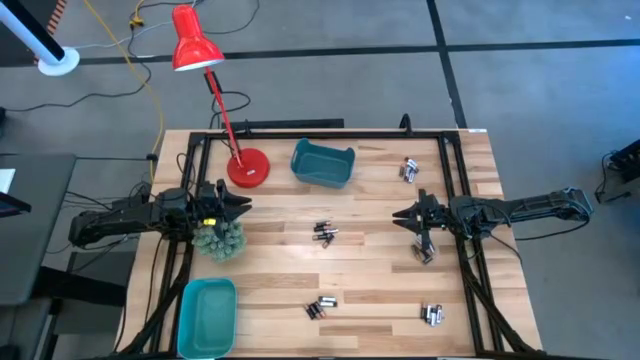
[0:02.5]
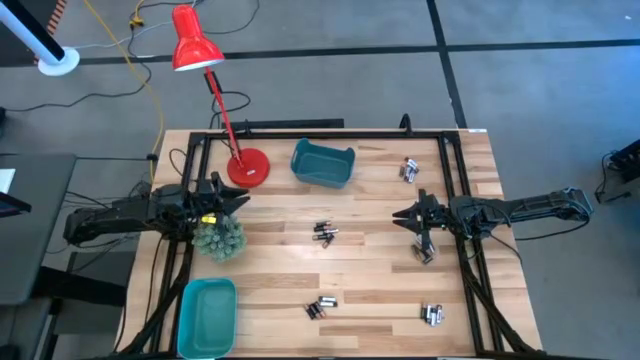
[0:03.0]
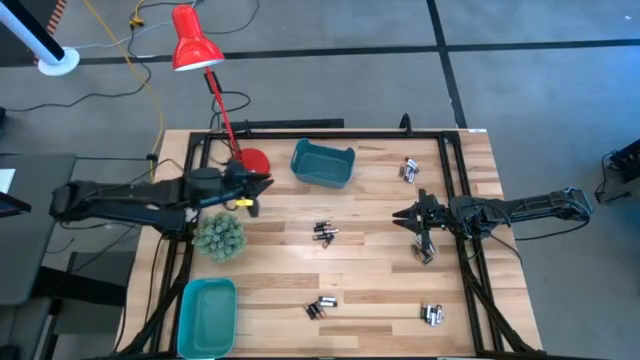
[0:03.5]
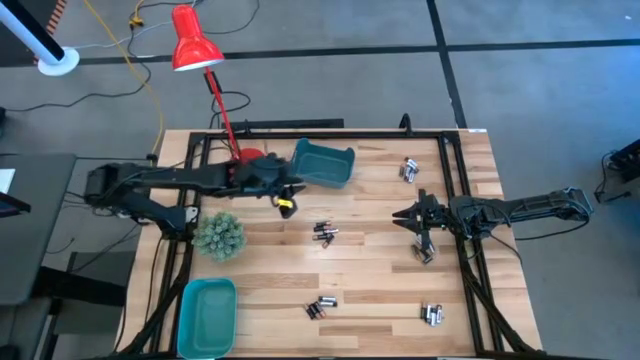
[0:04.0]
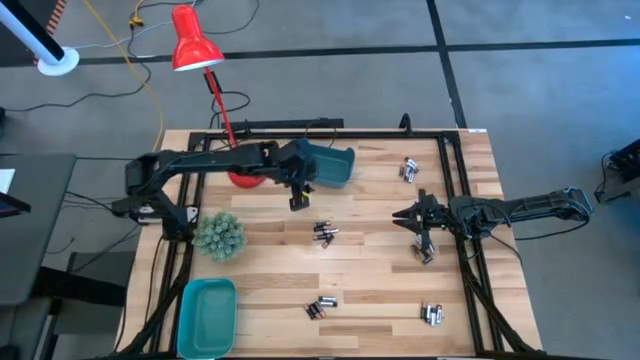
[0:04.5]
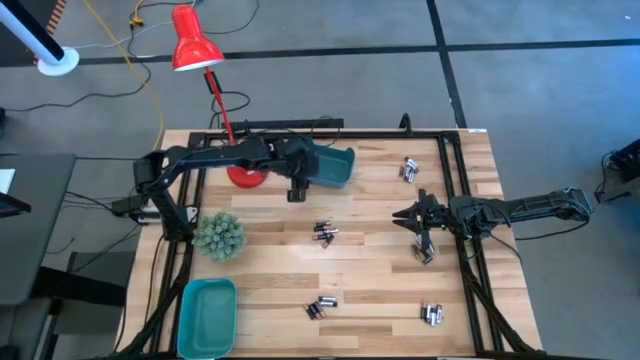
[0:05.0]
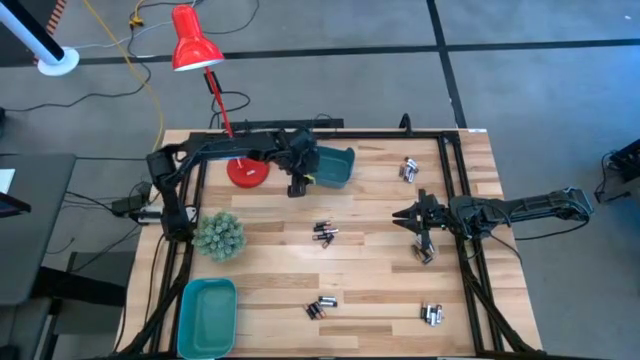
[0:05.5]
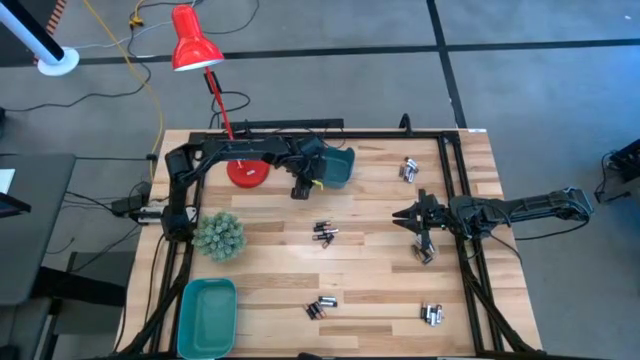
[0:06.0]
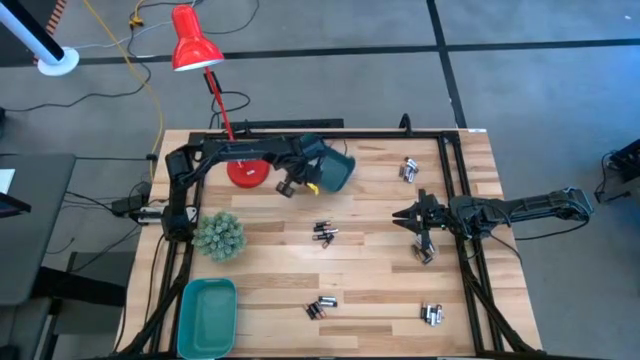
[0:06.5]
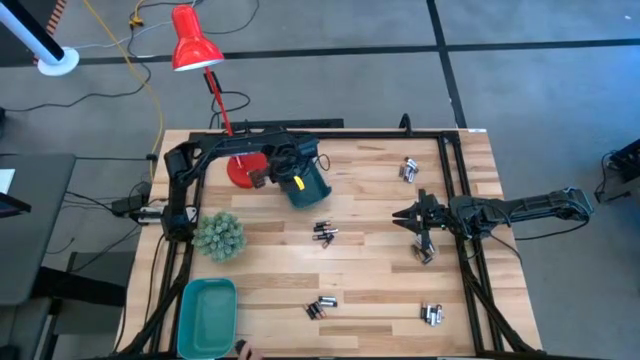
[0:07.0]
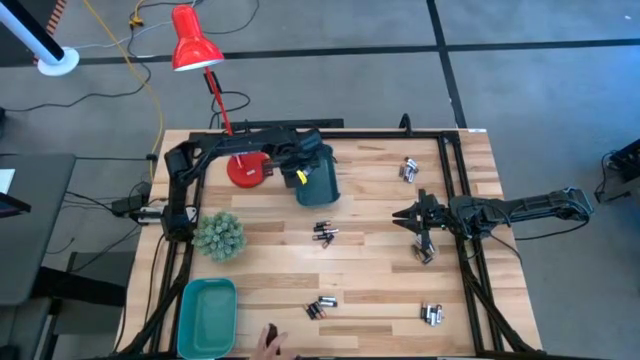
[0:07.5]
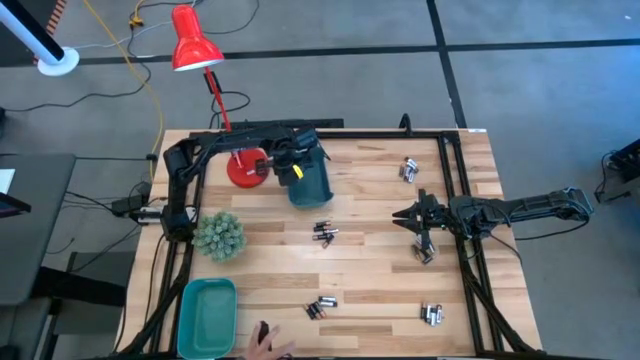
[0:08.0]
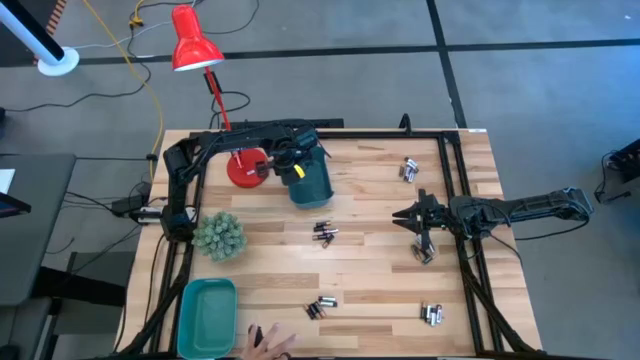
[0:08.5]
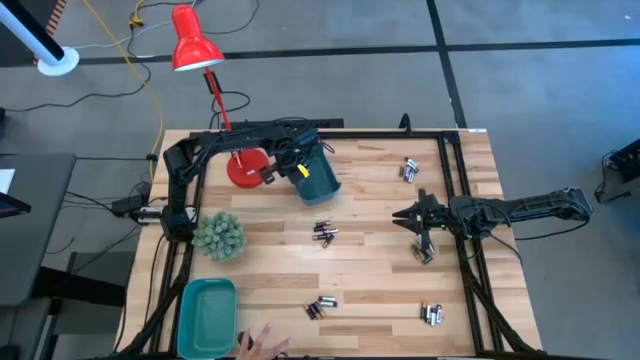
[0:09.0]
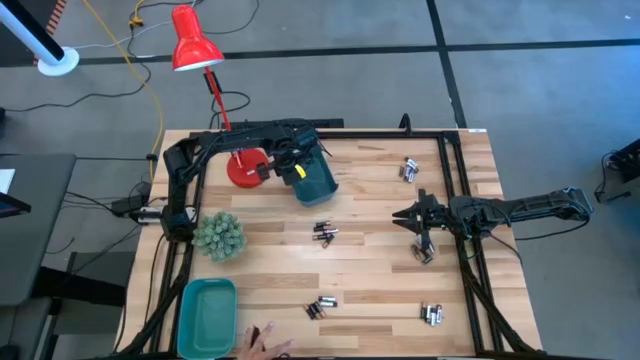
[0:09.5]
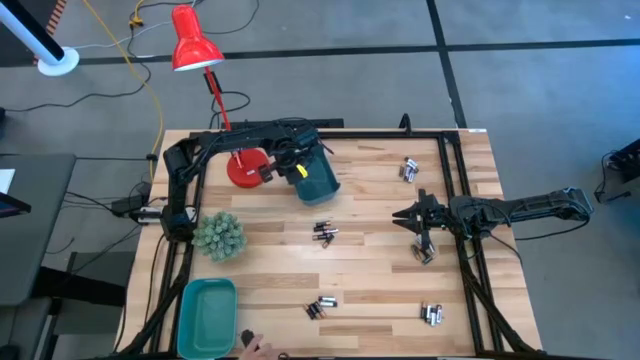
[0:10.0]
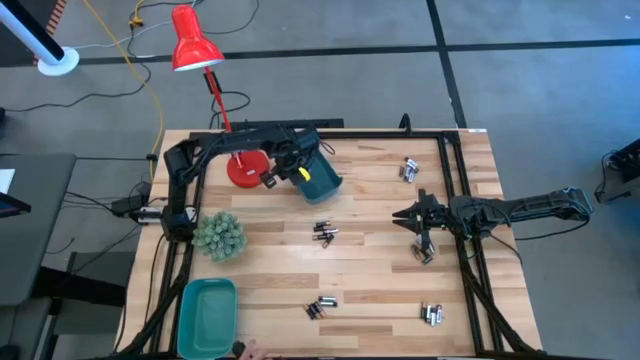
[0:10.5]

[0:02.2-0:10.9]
Task: Sort batteries
Move the blue bin

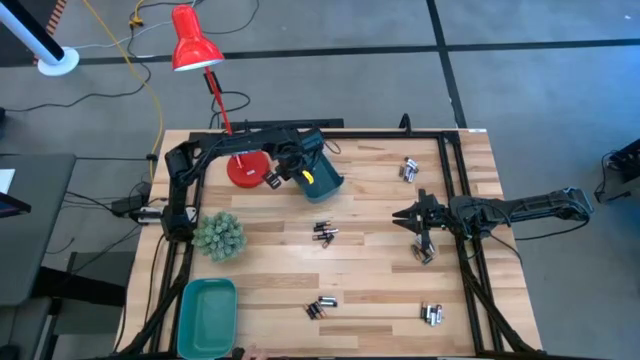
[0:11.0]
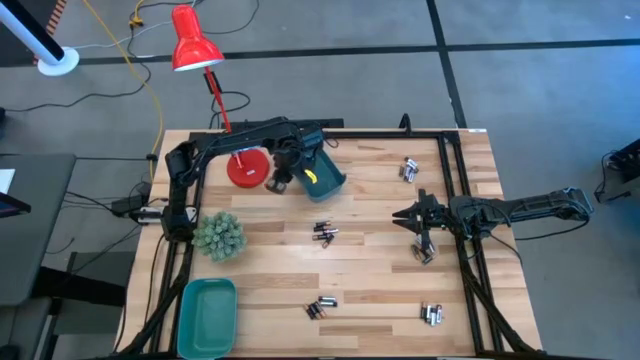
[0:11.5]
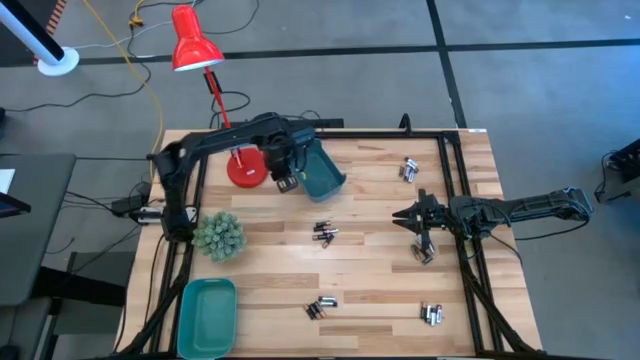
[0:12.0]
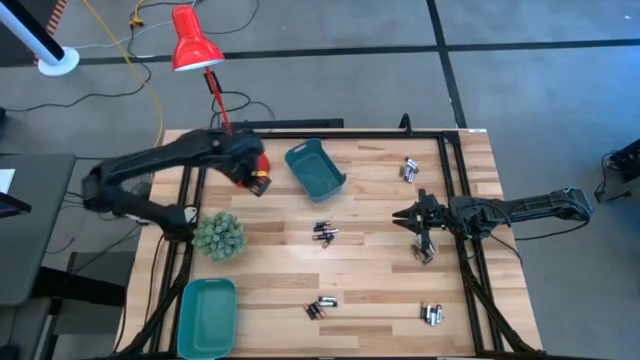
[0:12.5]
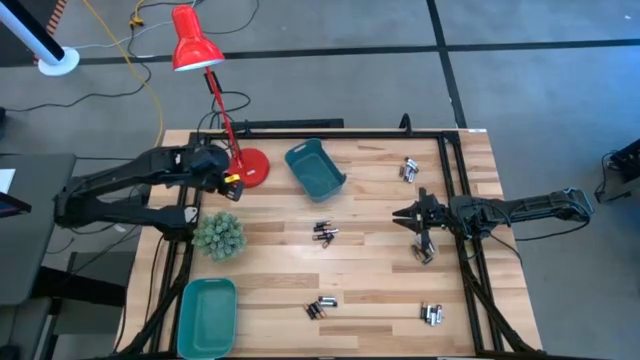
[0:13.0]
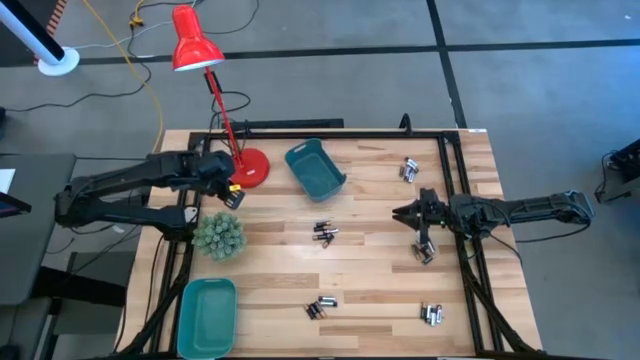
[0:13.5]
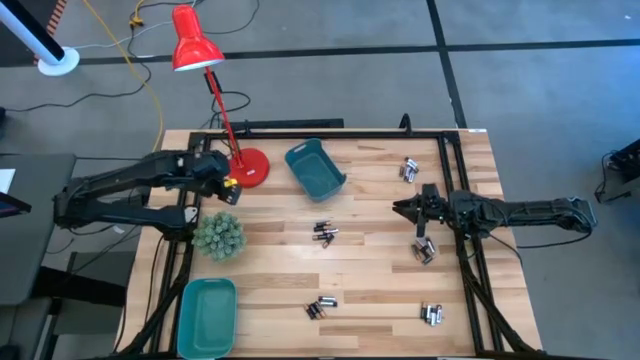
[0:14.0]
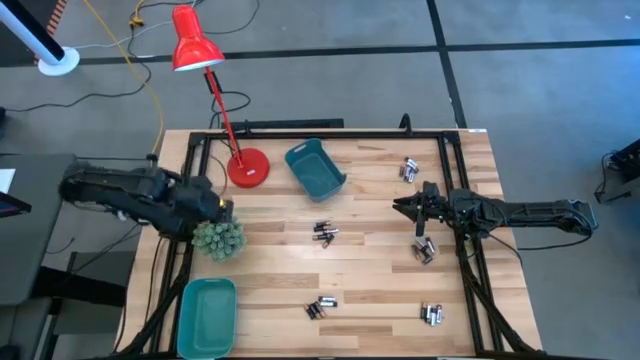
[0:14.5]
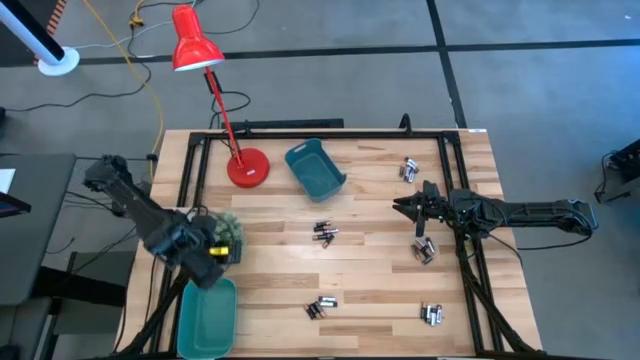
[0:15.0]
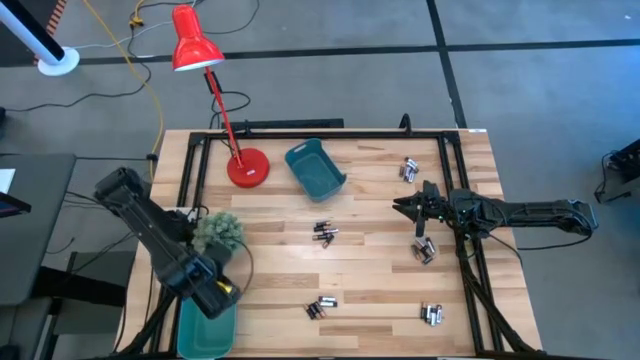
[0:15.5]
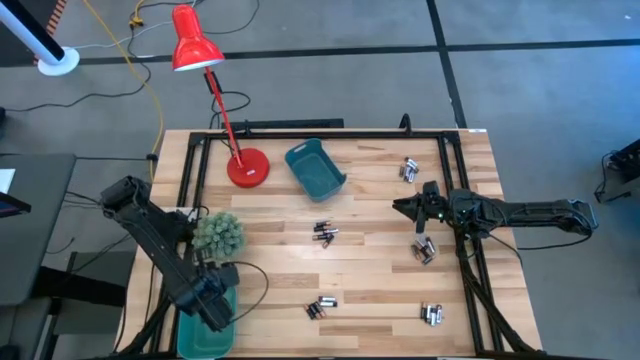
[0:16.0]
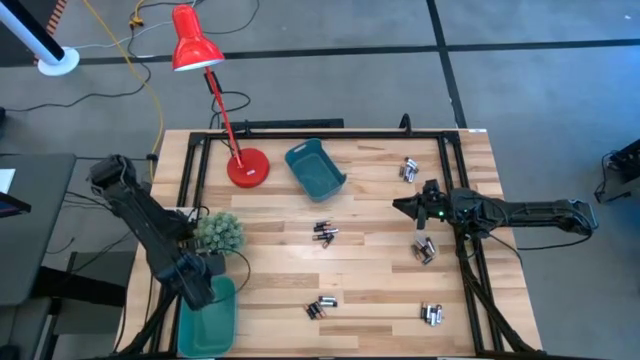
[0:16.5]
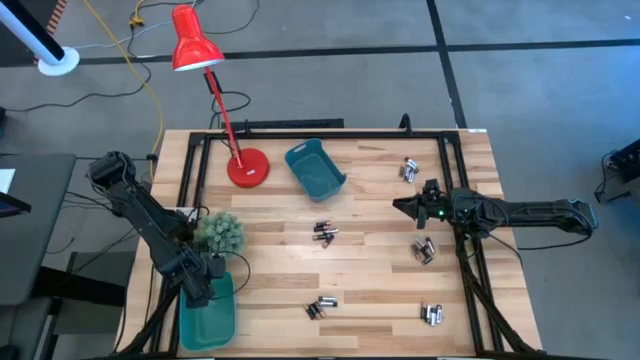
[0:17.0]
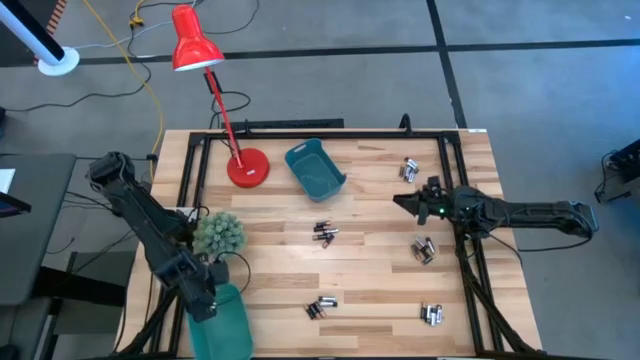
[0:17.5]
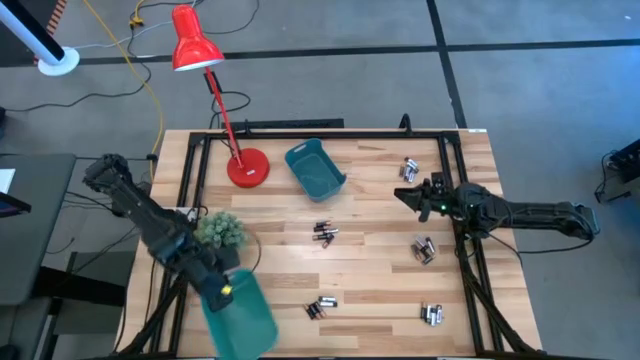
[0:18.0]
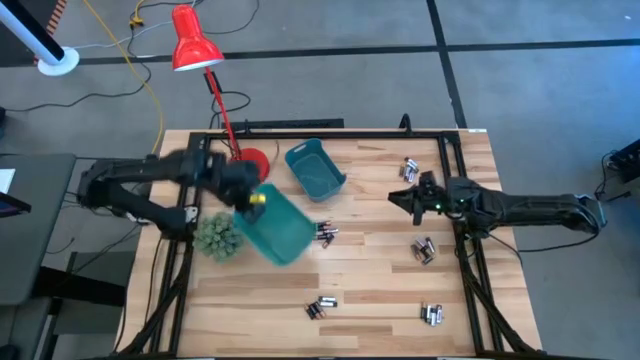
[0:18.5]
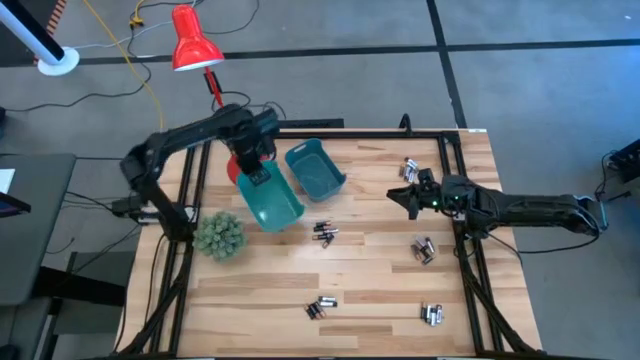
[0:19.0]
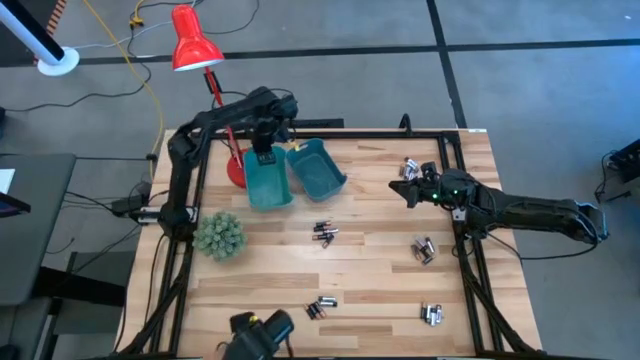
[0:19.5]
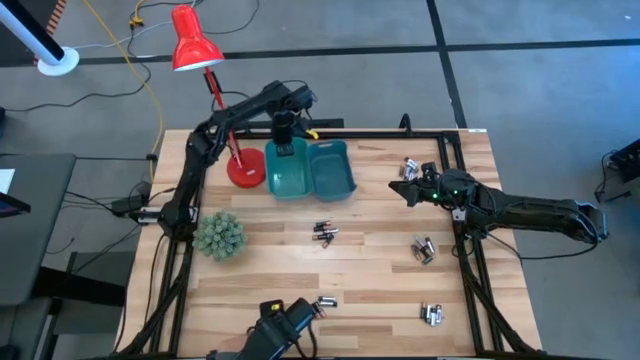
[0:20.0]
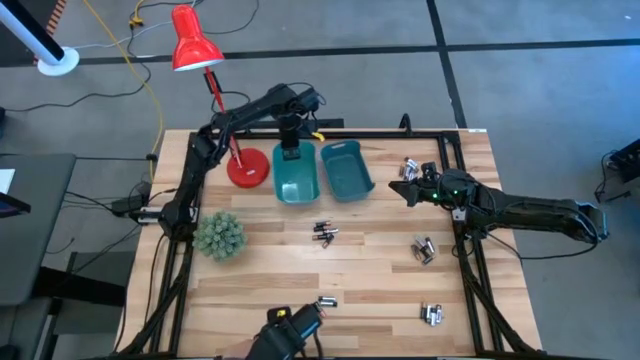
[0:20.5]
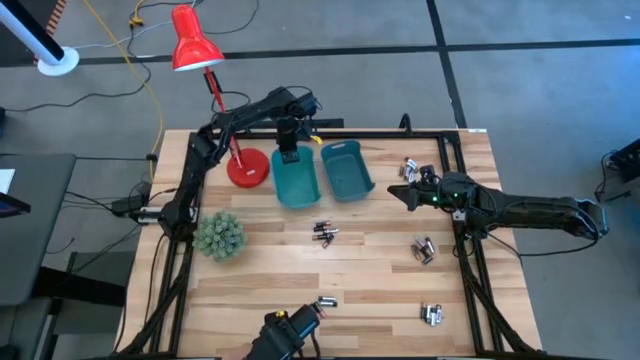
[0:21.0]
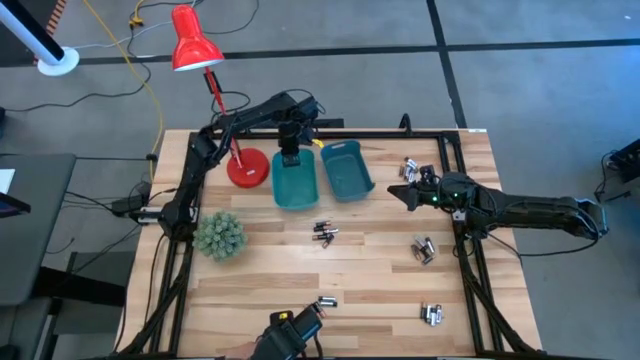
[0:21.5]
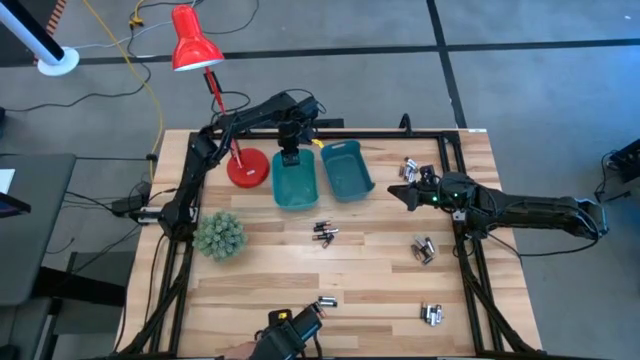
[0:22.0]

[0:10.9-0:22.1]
Move the green bin into the top left of the table

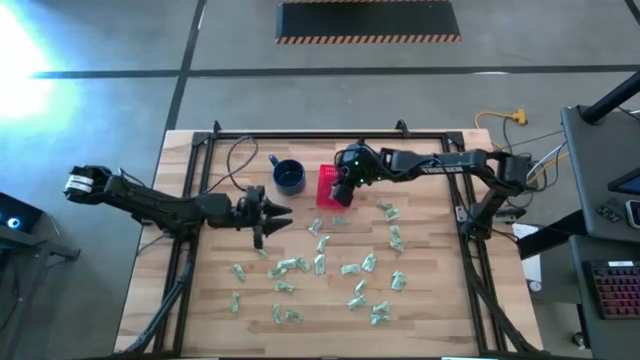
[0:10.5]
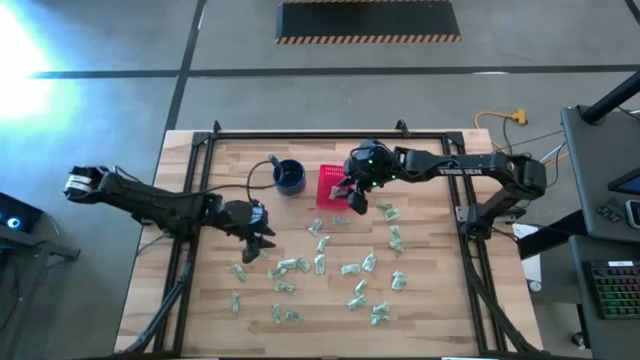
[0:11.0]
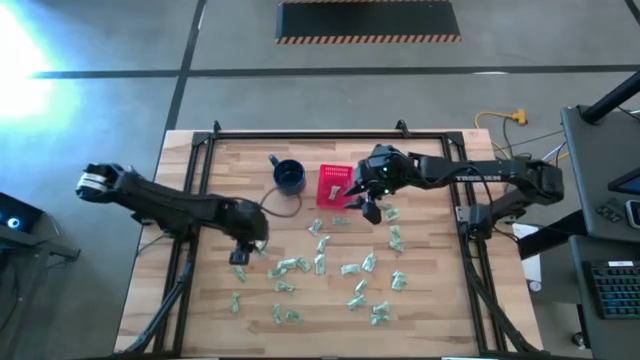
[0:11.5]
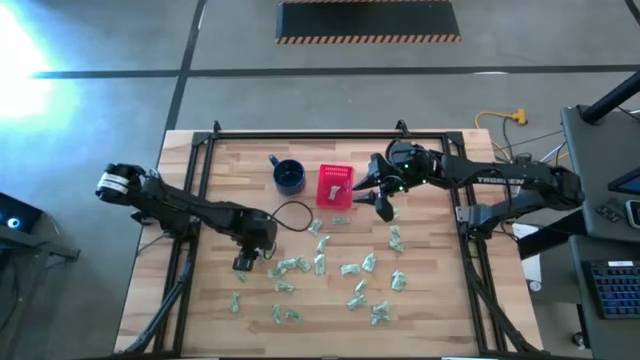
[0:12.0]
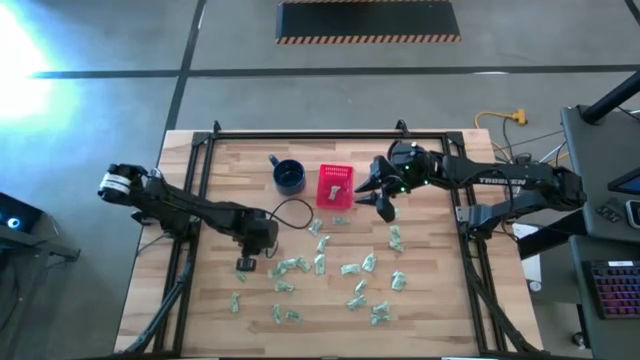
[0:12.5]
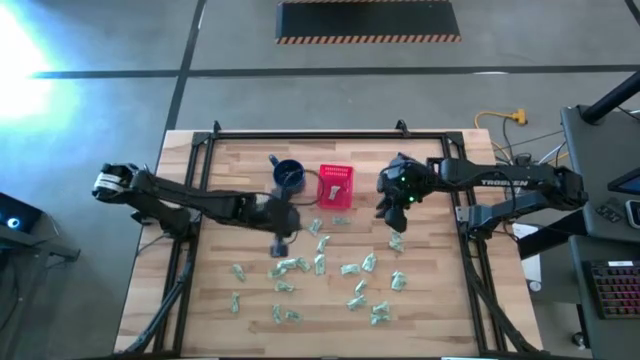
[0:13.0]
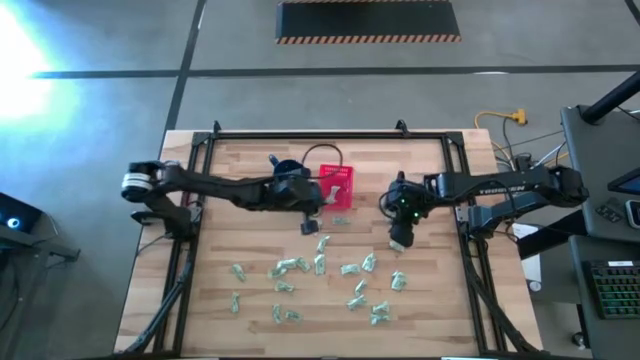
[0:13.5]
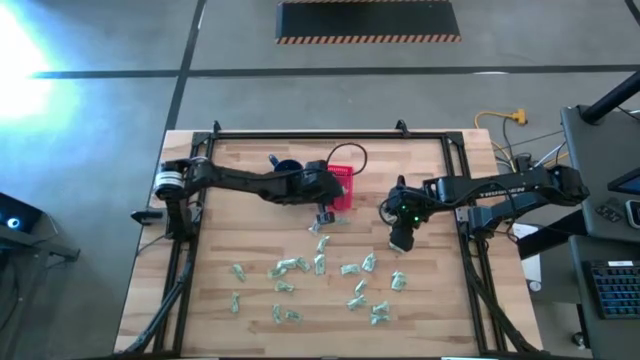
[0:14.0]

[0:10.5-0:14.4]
Task: Pick and place Stevia / Truvia into bins
Put the stevia packet into the basket
